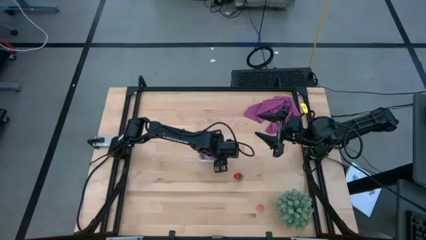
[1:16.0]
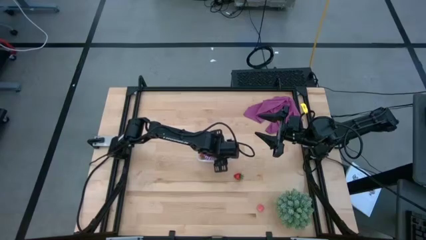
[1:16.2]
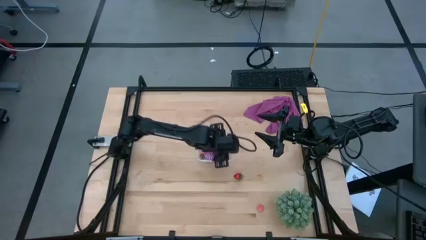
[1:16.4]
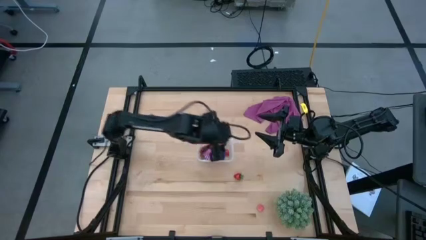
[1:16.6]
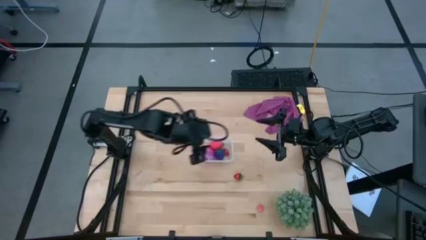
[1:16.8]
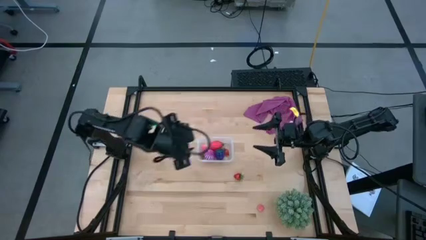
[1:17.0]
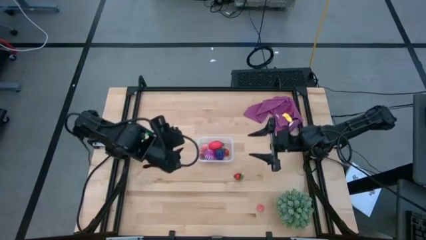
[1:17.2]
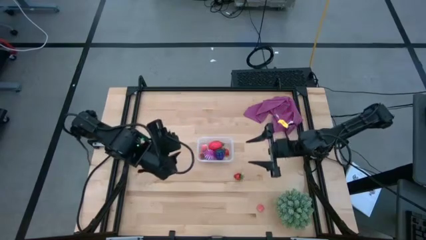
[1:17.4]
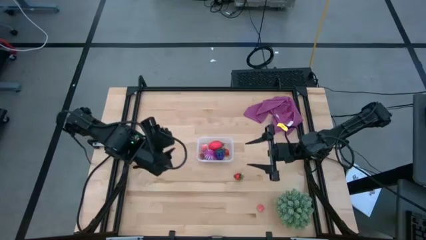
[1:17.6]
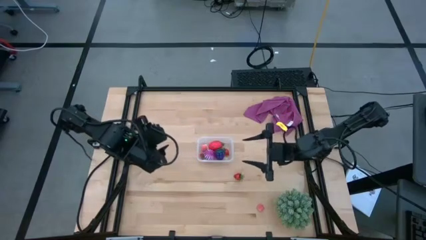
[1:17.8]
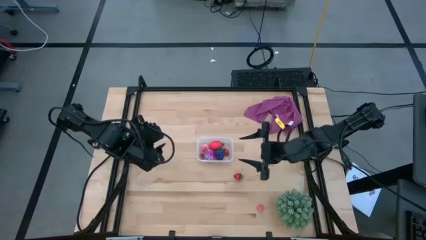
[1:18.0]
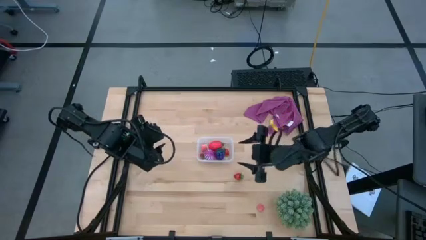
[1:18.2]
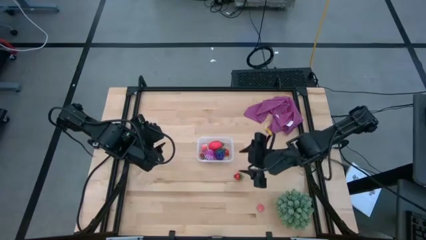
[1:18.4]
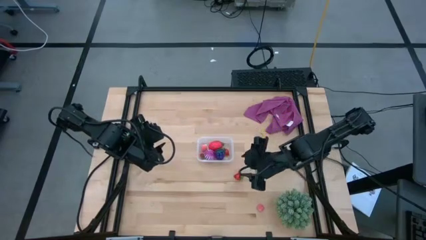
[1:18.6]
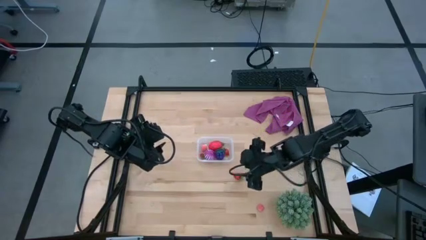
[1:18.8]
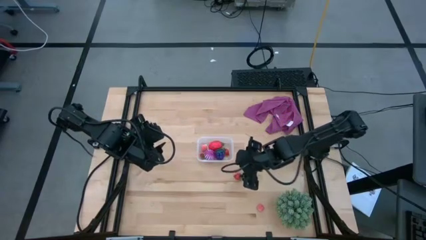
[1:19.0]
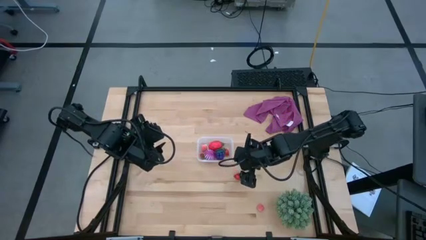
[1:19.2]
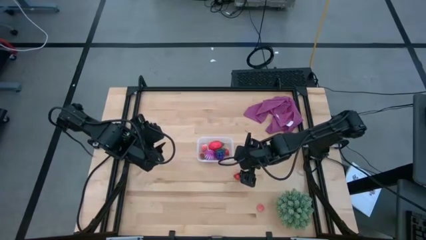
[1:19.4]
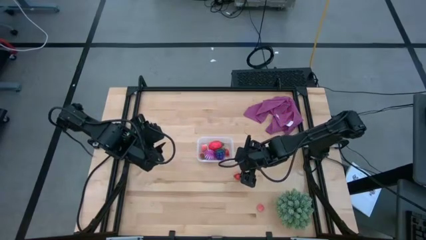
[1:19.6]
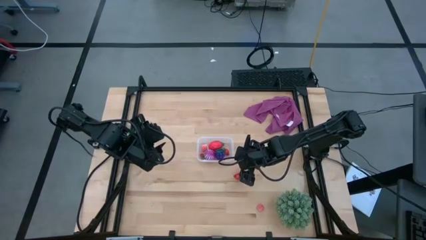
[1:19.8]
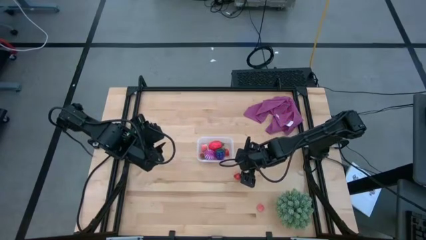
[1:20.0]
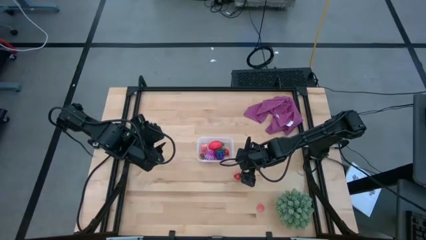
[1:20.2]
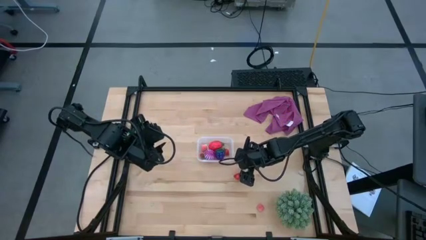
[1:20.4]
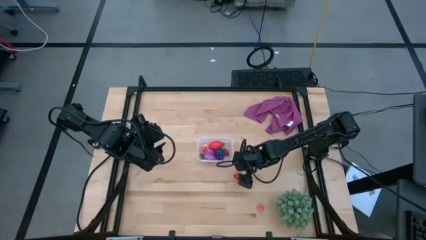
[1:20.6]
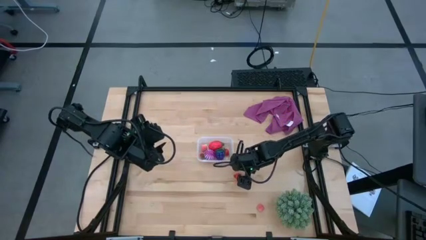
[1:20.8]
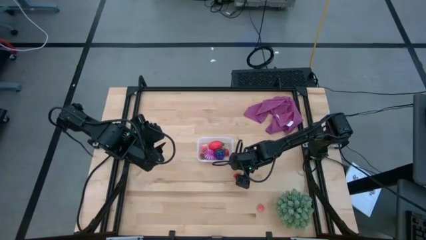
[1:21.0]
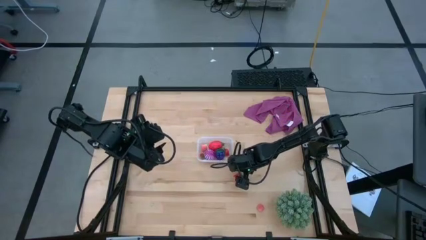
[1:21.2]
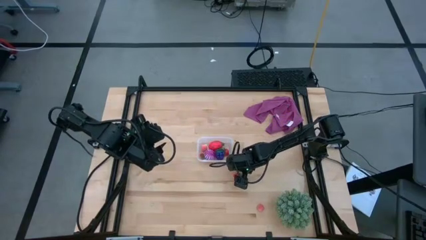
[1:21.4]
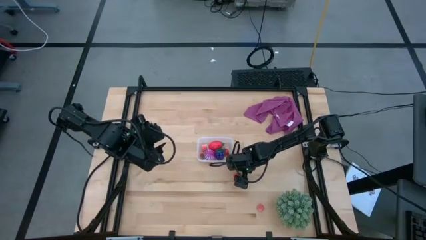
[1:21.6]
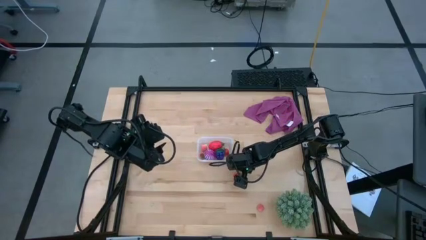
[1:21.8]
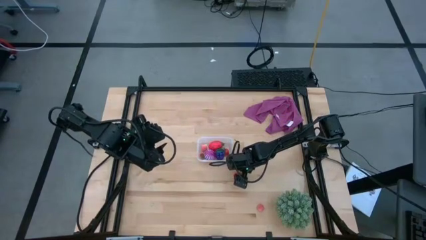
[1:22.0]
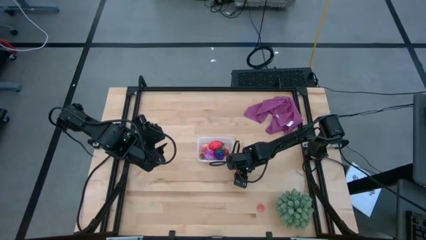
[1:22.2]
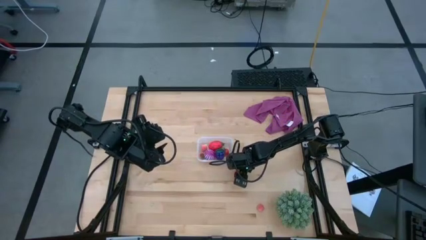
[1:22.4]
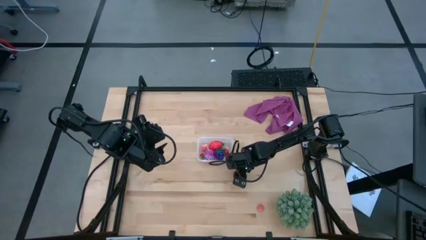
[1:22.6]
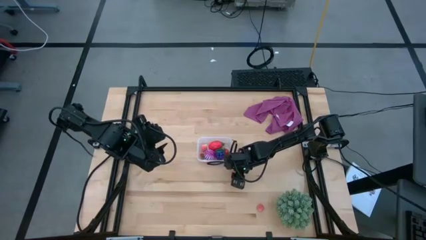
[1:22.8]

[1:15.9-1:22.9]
Task: Pick and placing Produce into tupperware
Put the red strawberry fruit into the transparent container

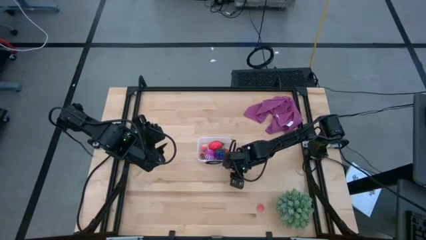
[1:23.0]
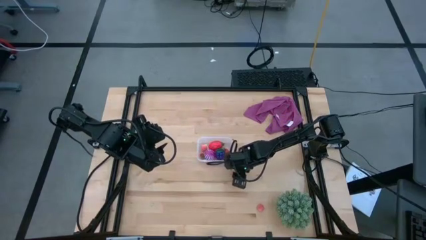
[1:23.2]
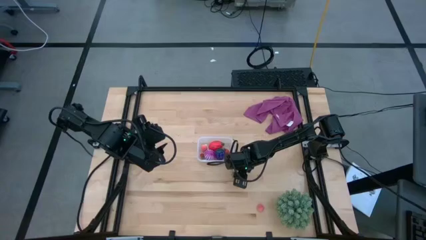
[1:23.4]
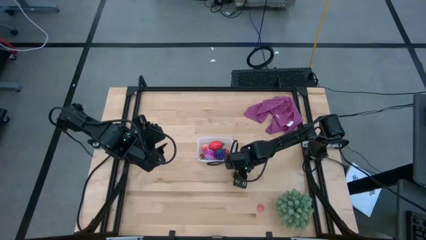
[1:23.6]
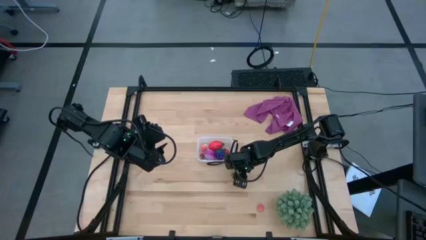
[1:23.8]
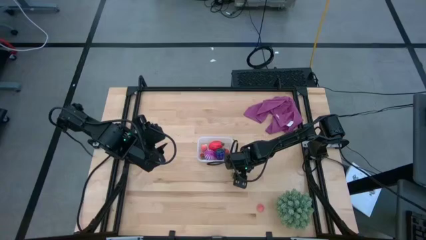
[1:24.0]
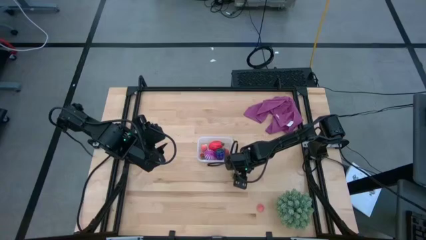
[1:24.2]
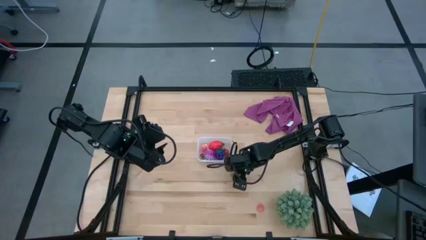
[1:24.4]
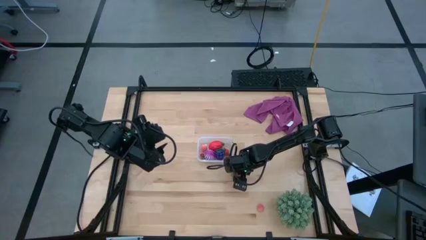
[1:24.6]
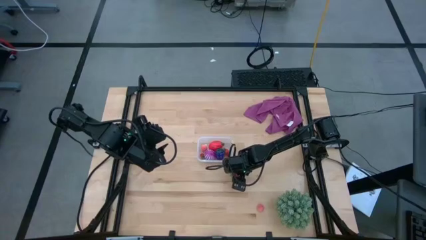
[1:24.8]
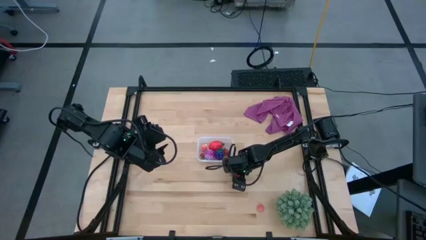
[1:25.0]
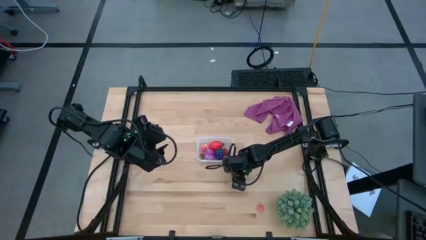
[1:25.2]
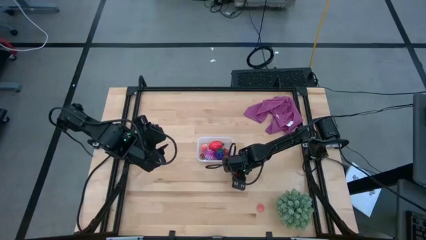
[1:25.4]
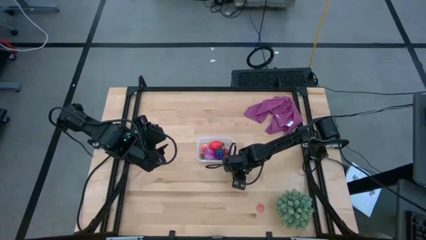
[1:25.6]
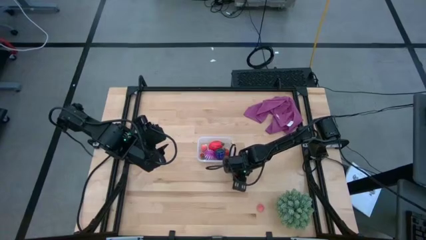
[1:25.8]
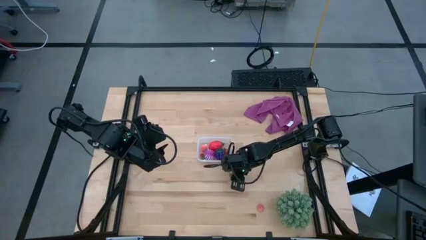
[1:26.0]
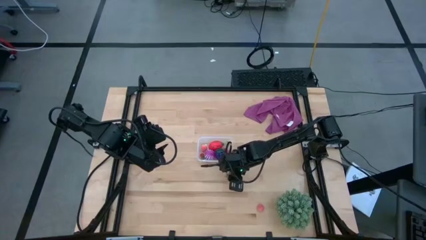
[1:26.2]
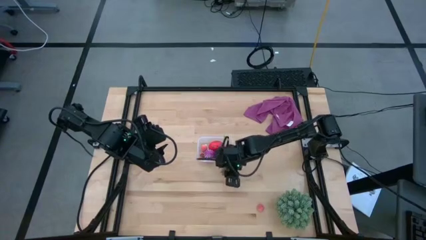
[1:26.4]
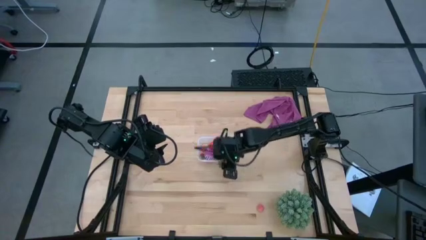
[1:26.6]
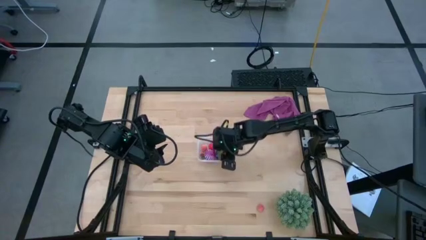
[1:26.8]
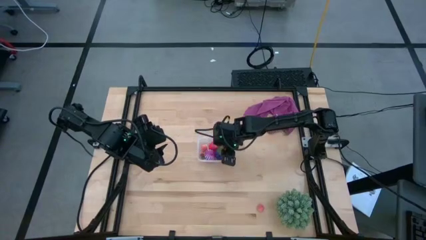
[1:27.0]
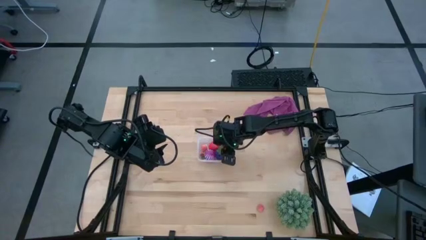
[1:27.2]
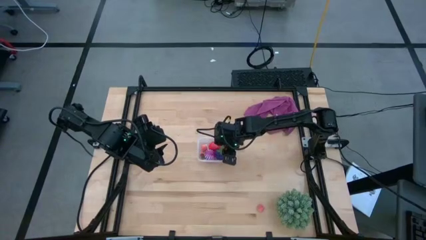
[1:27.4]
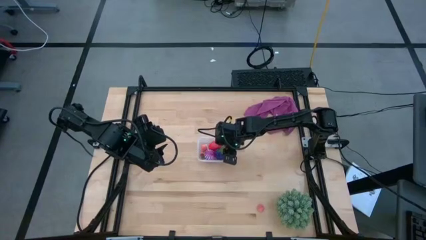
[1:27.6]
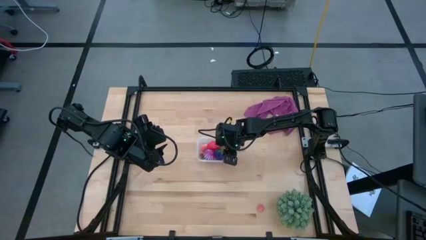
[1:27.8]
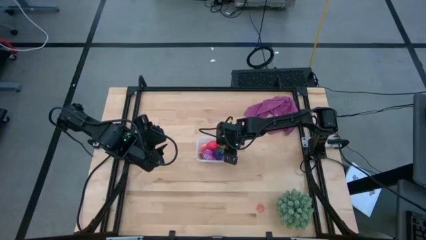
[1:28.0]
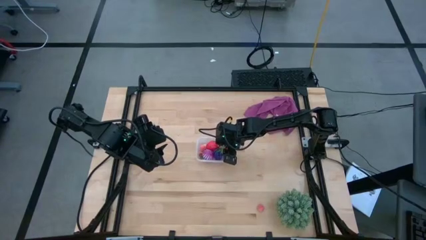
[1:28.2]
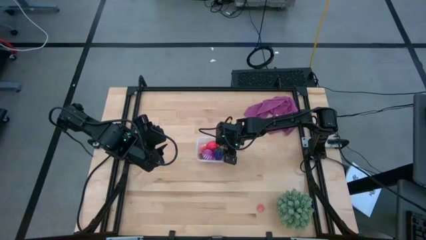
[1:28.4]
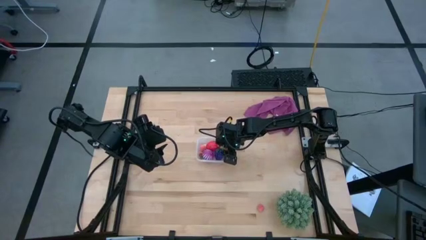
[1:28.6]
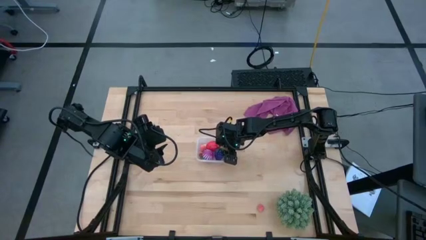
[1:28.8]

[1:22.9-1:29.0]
Put the red strawberry fruit into the transparent container
